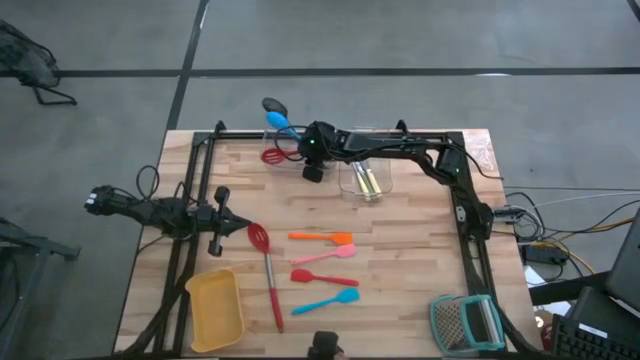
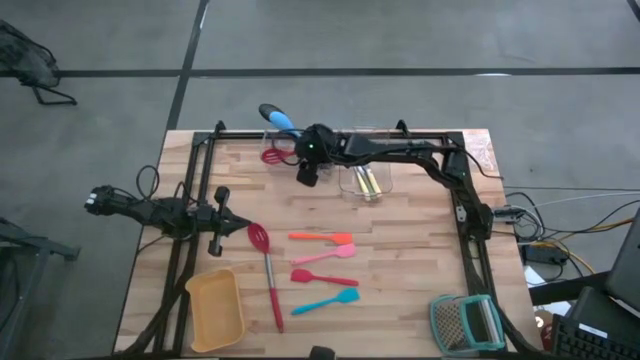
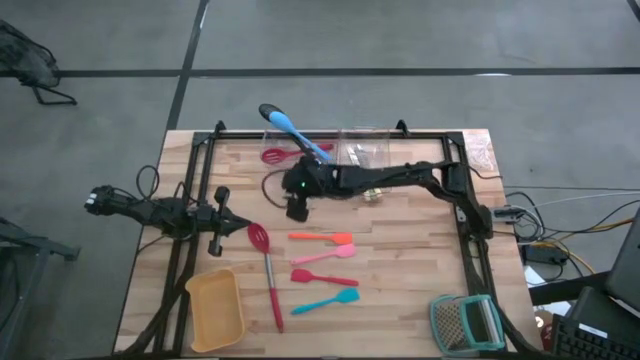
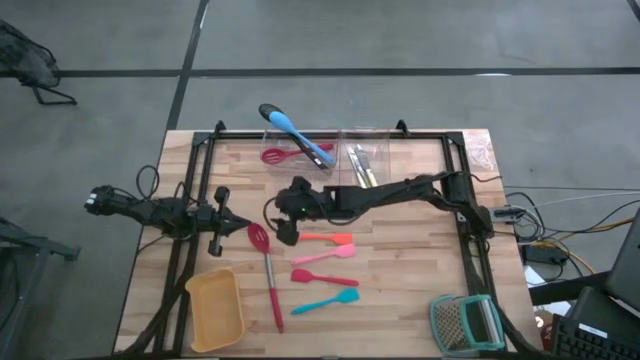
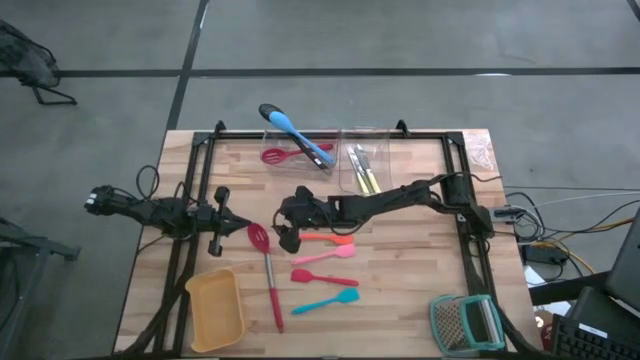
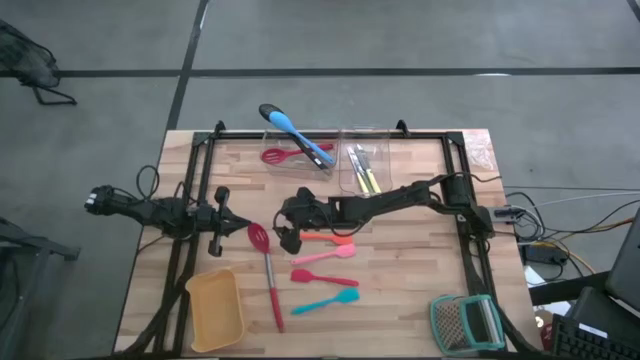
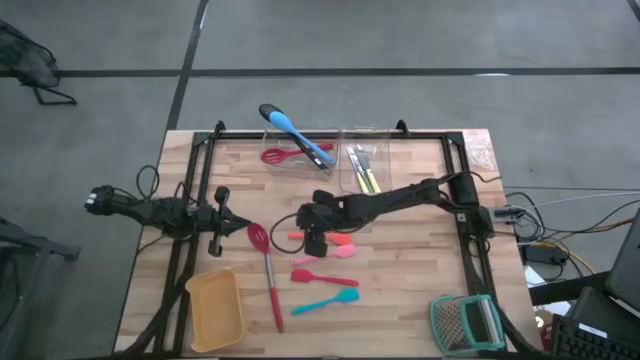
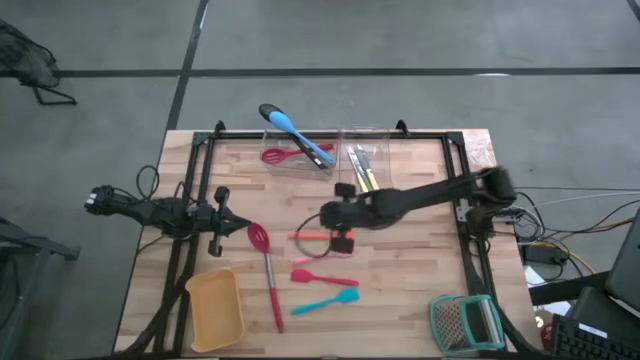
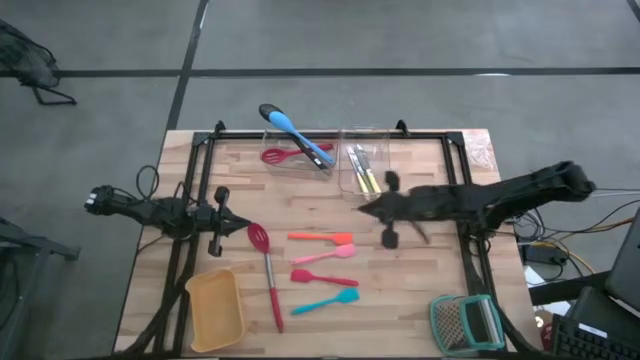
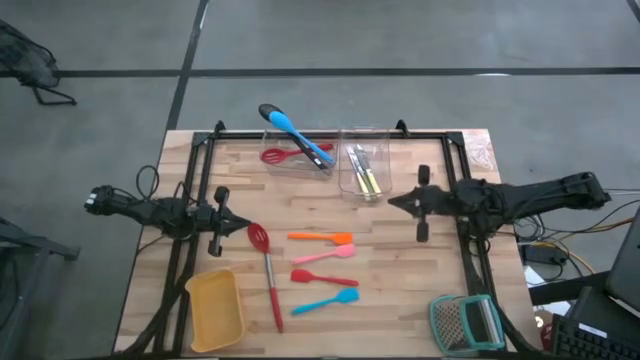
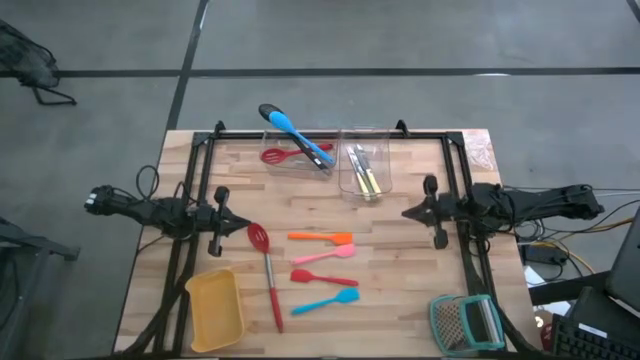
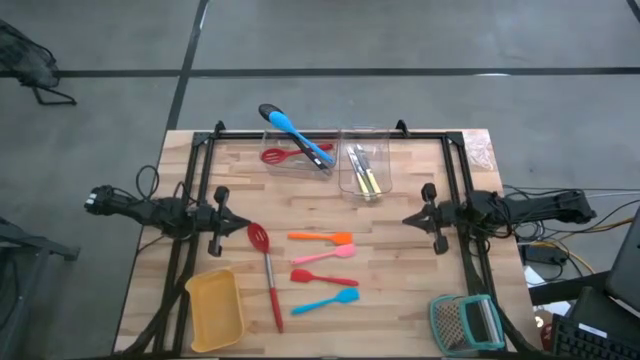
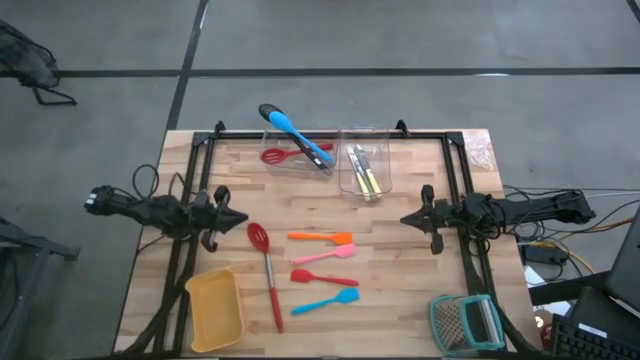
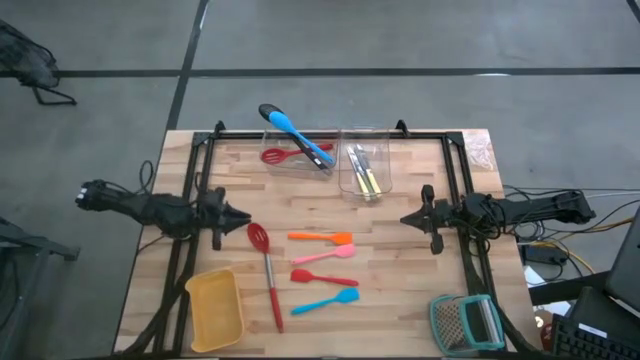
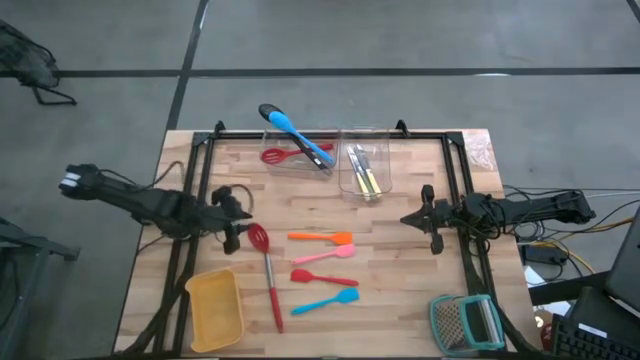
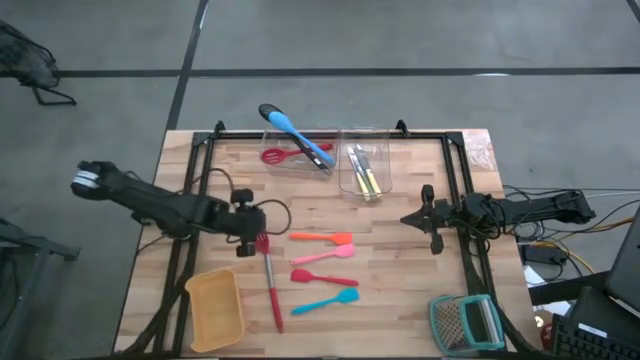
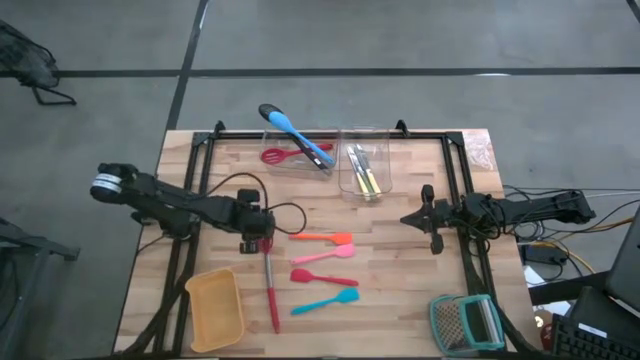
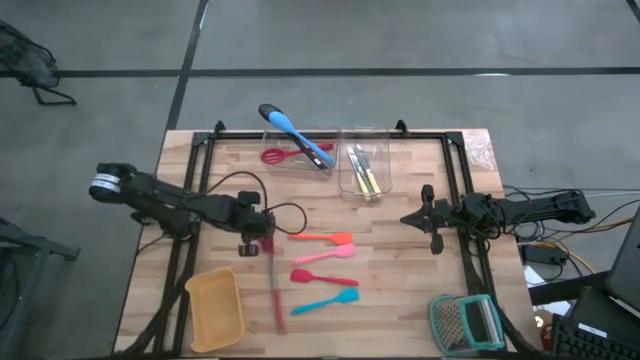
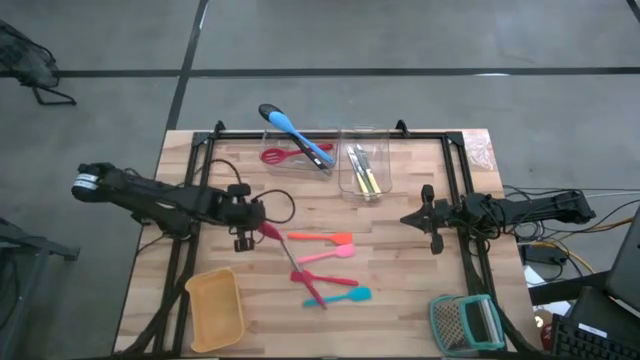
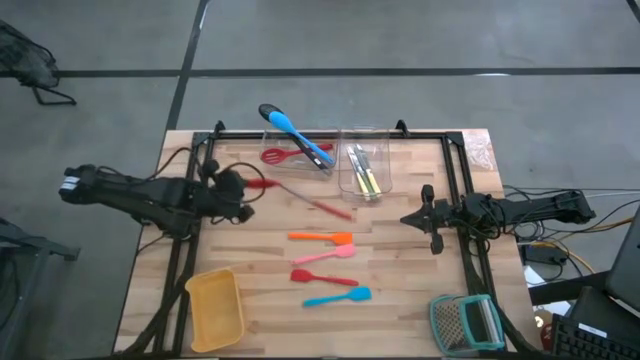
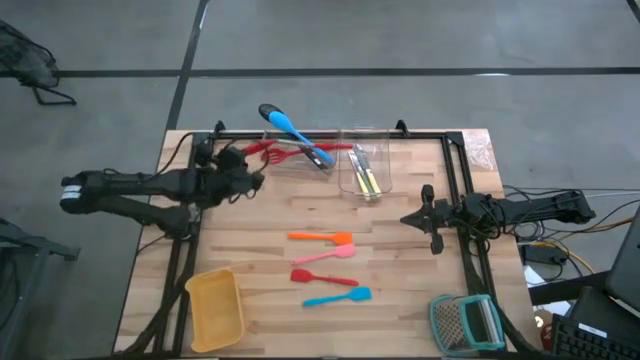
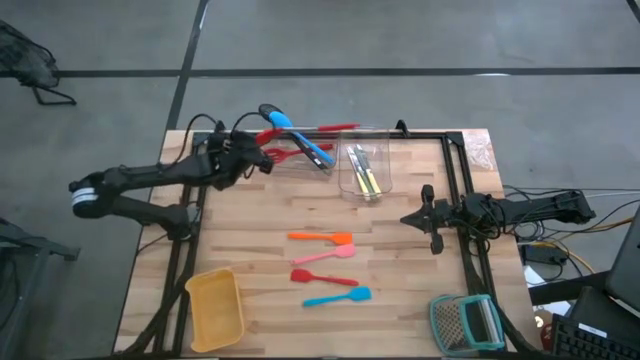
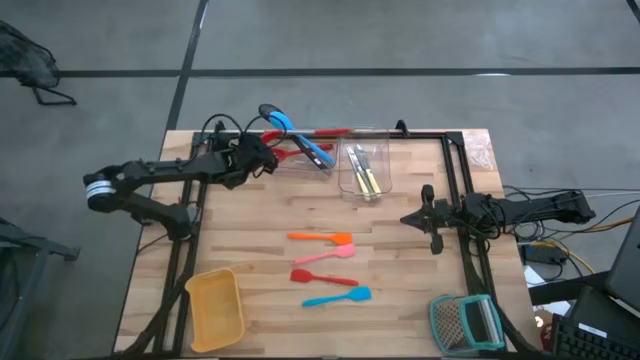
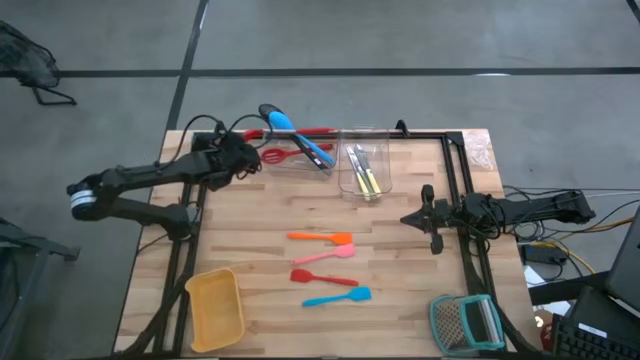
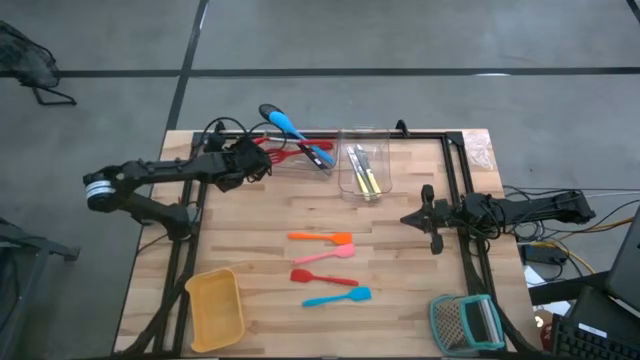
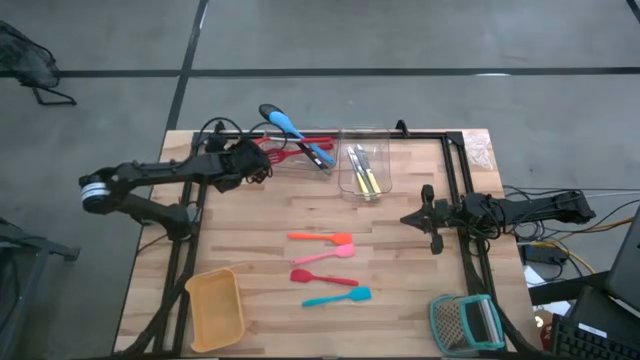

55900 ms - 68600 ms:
Task: Pick & Place Kitchen Items
Put the red serving spoon into the left transparent bin

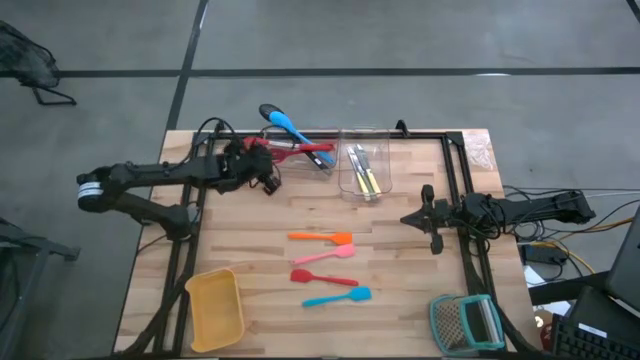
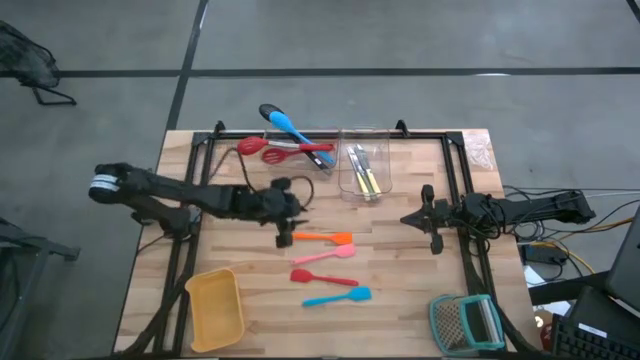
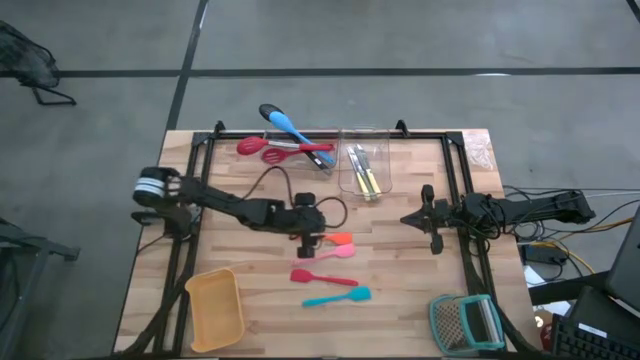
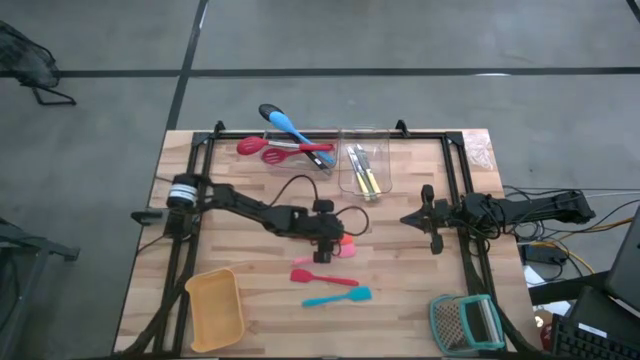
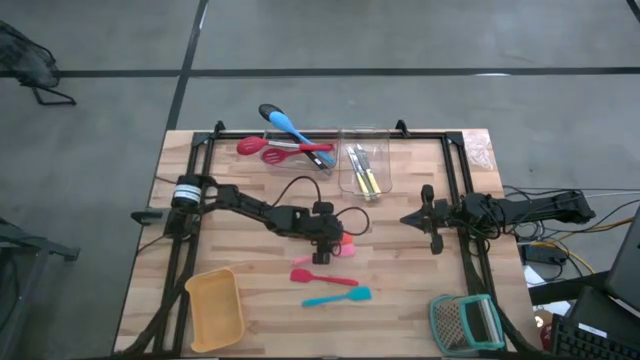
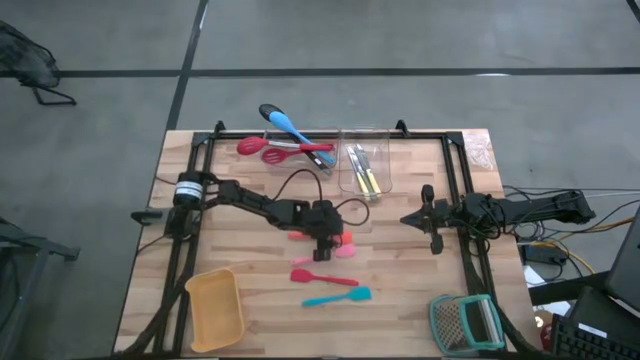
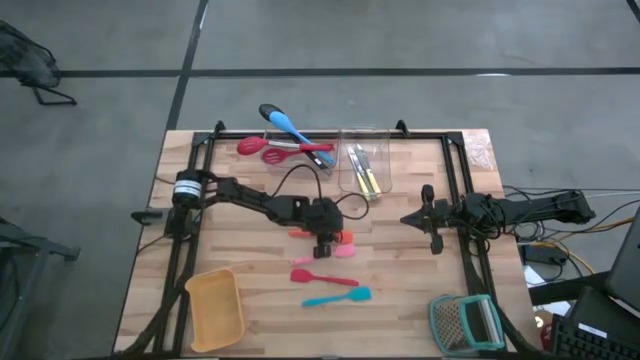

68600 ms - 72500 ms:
Put the orange spatula into the yellow bin

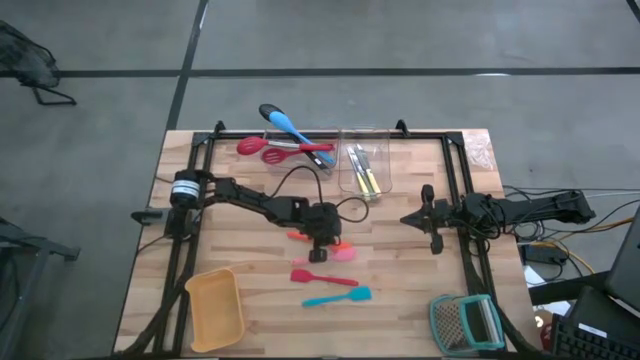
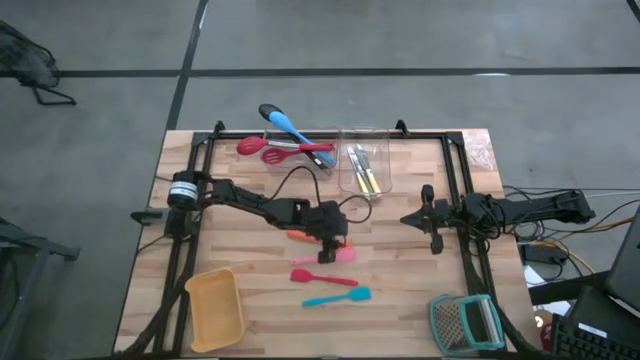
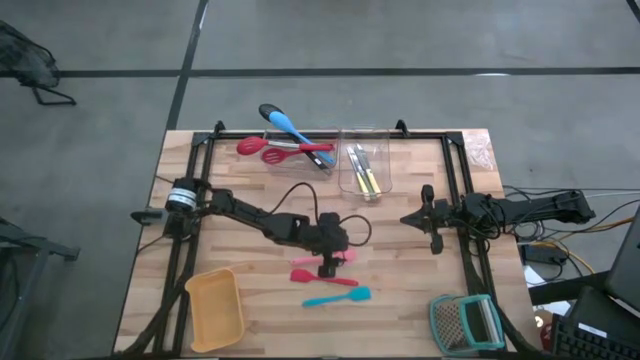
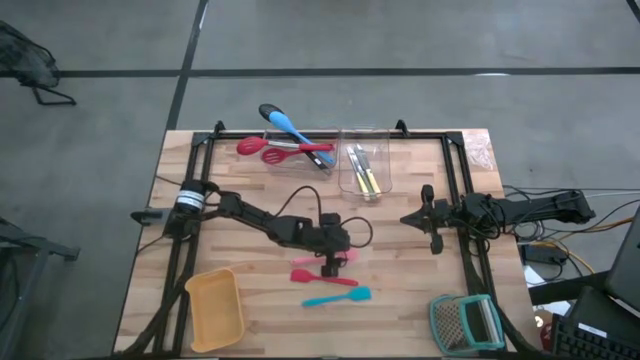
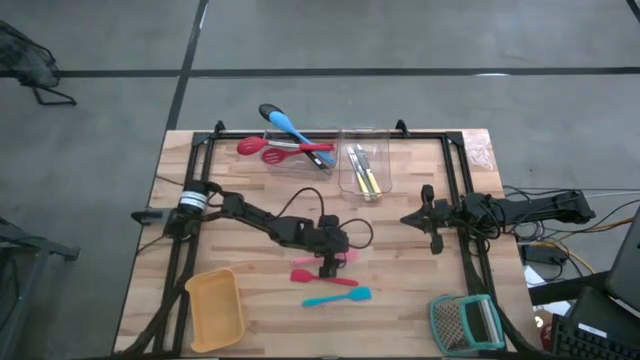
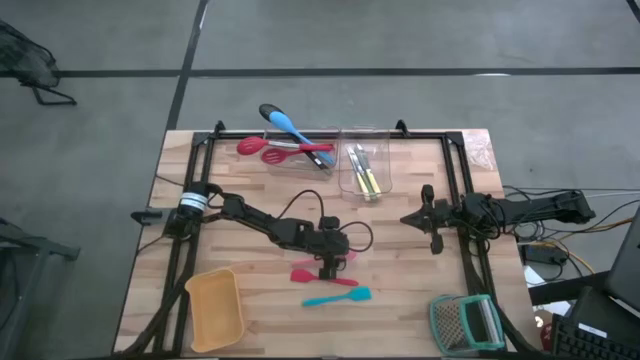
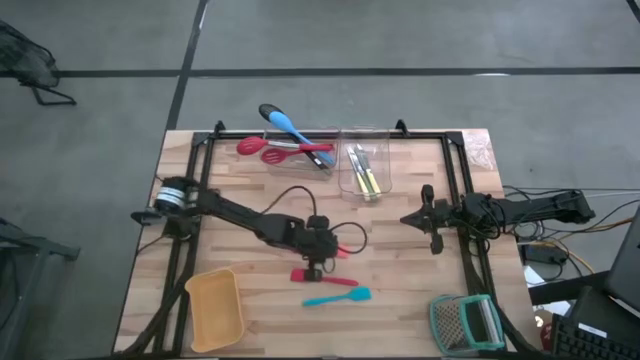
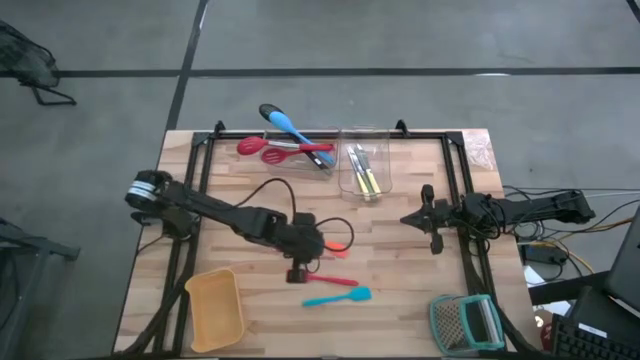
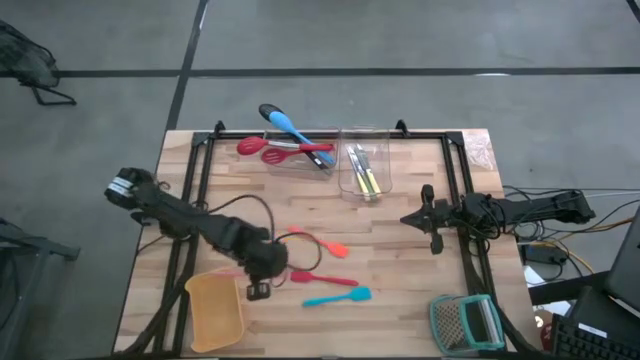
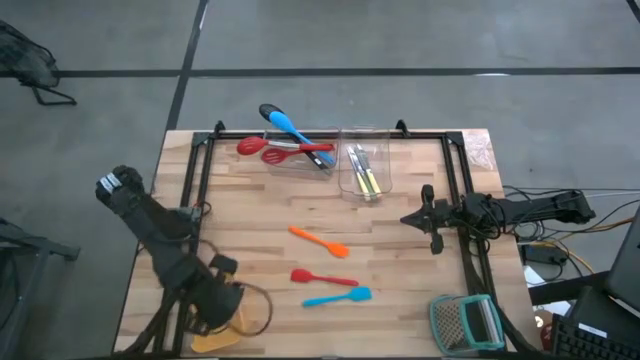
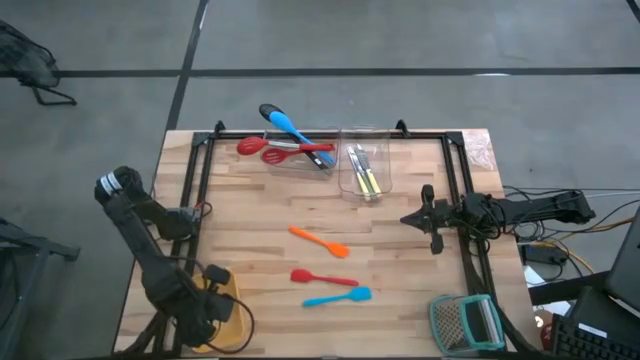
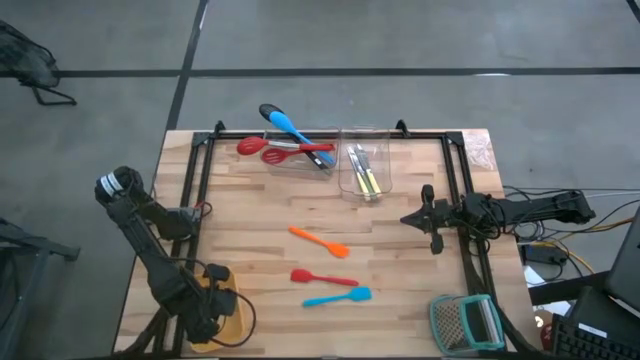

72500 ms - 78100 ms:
Put the pink spatula into the yellow bin
